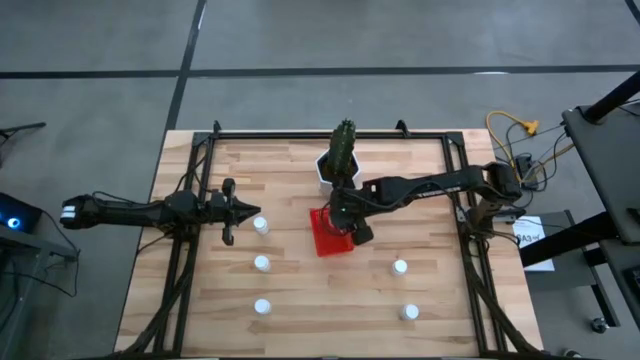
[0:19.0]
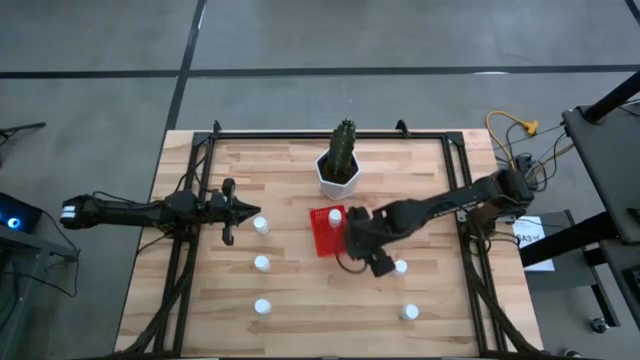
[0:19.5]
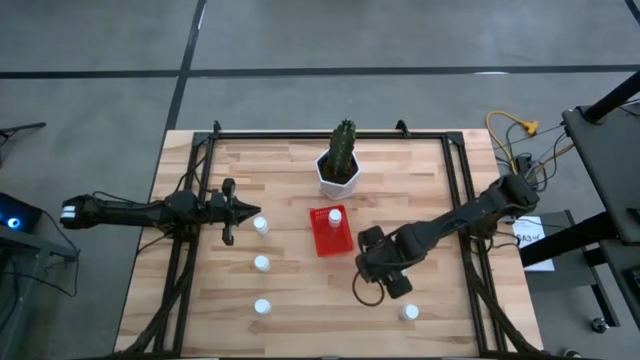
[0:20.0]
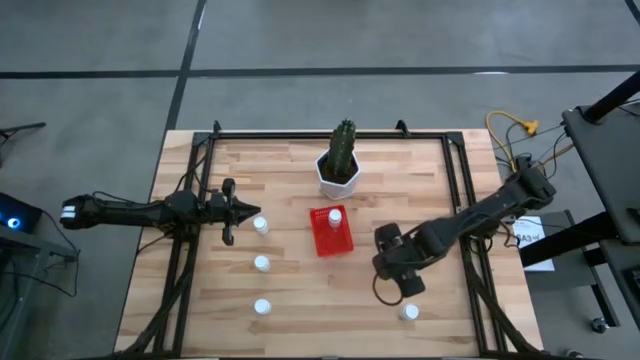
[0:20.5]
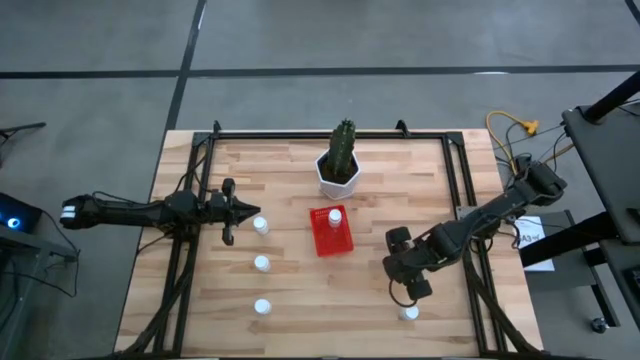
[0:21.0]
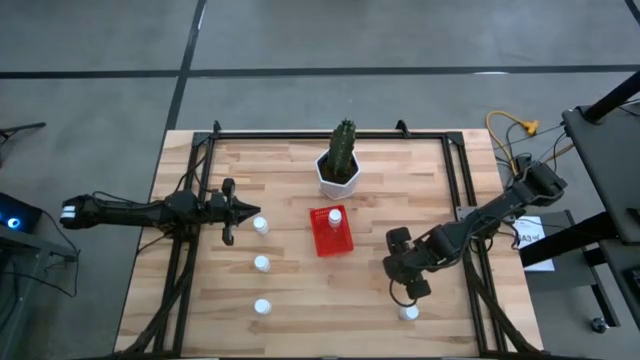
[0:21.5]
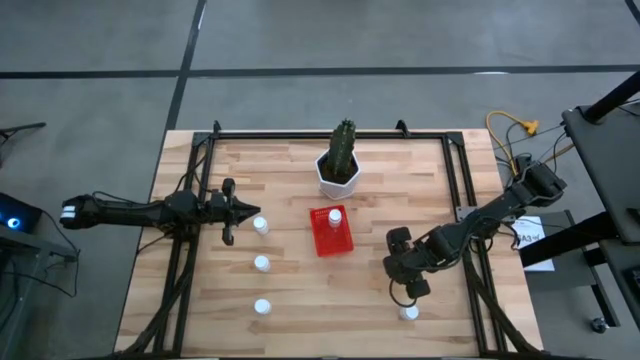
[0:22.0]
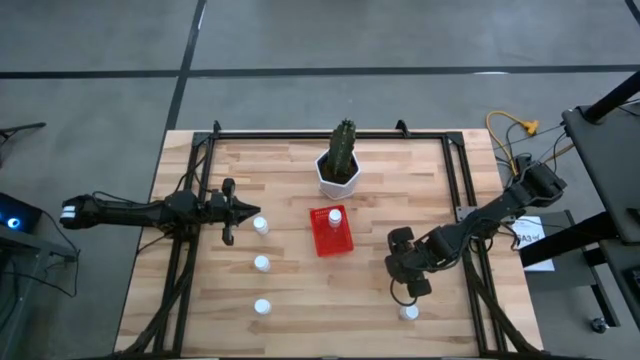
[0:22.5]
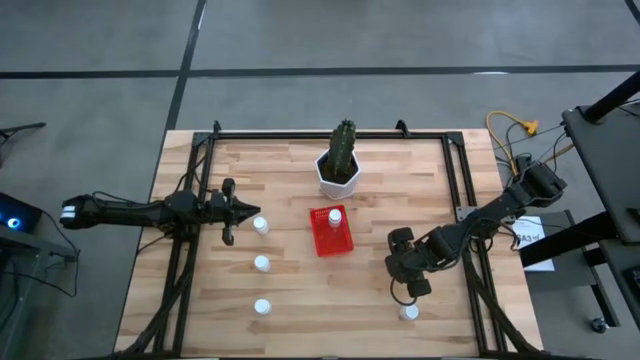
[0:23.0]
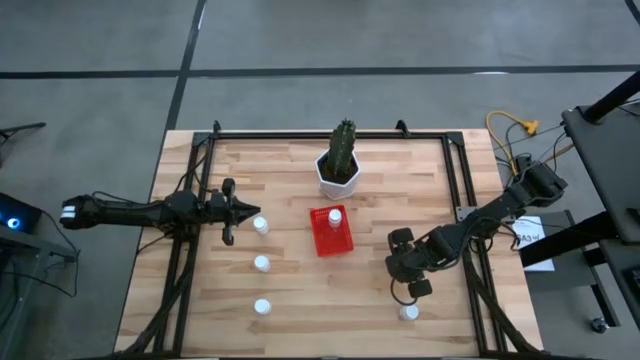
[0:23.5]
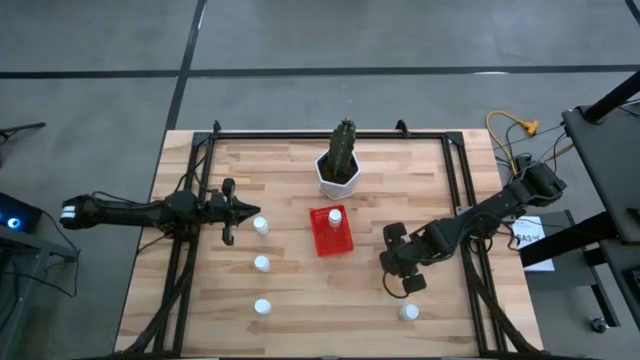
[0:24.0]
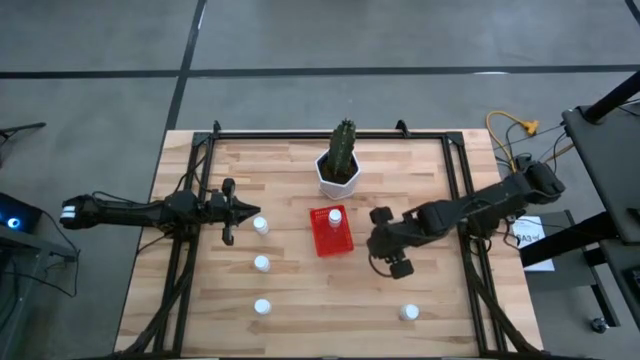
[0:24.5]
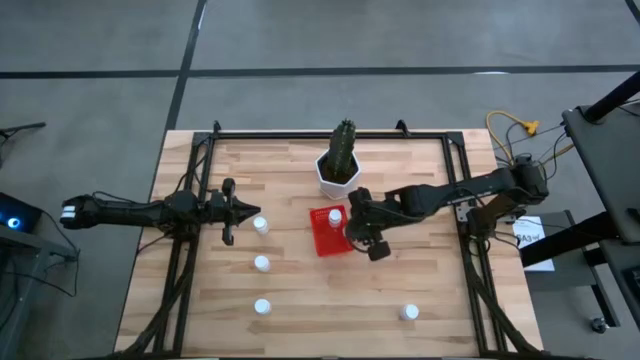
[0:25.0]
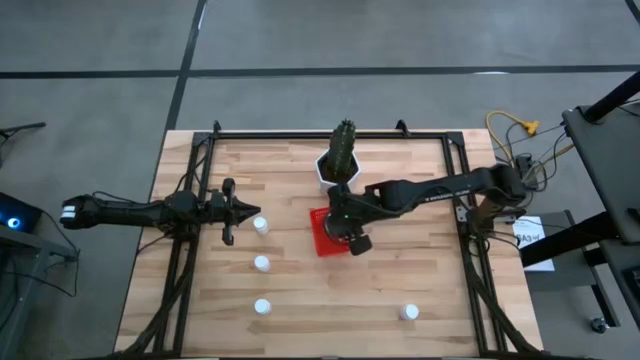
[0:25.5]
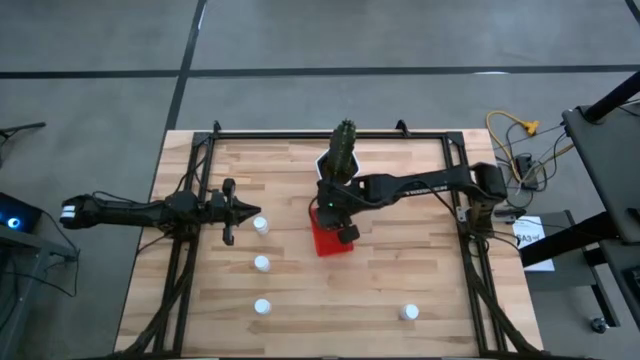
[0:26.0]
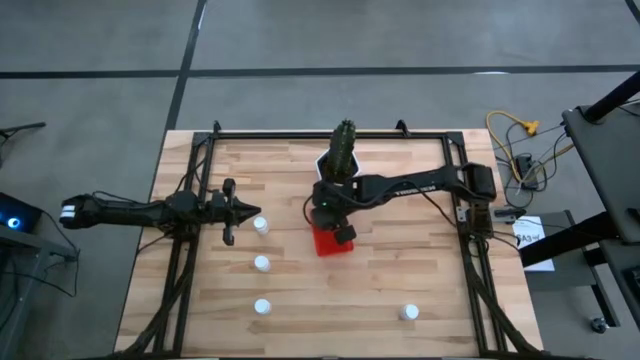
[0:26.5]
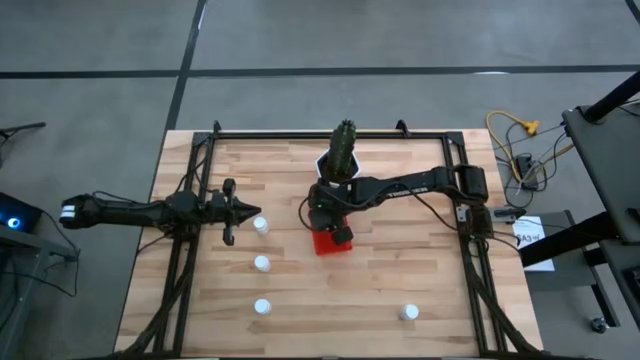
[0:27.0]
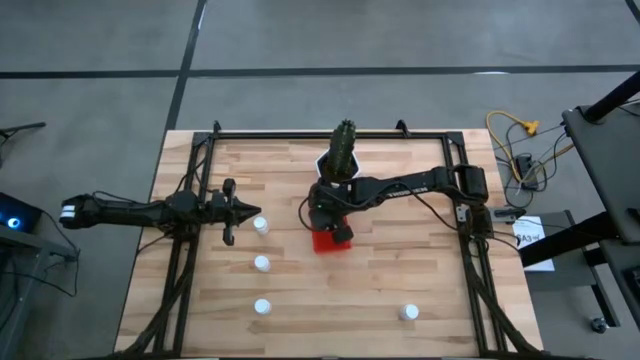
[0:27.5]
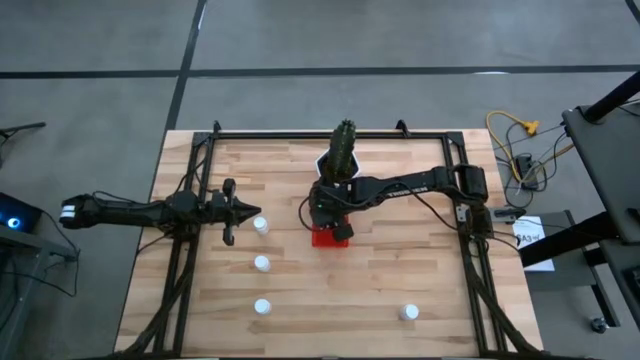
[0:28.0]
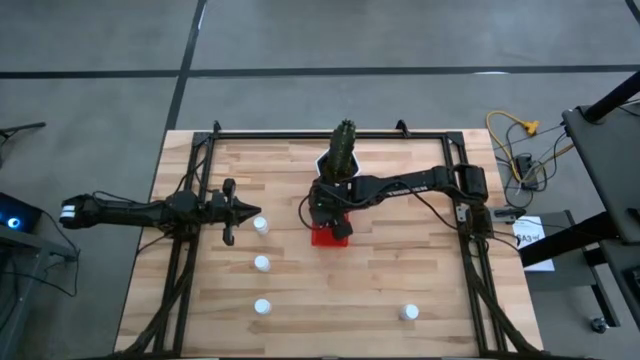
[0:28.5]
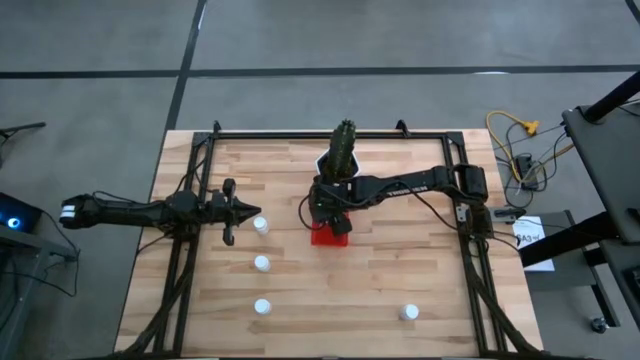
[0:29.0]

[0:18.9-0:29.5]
Task: Pick and place pill bottles into a basket
Put the white pill bottle into the red bin

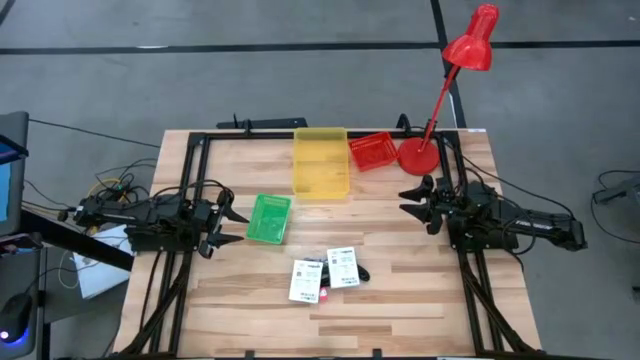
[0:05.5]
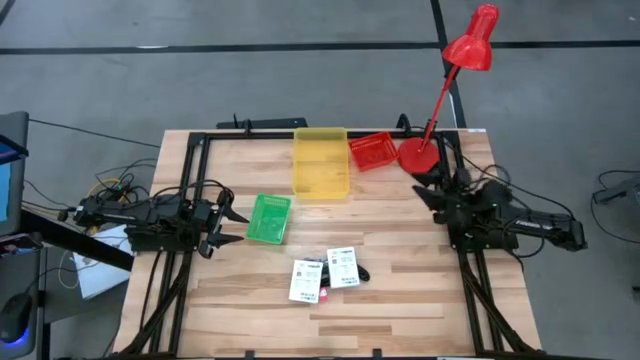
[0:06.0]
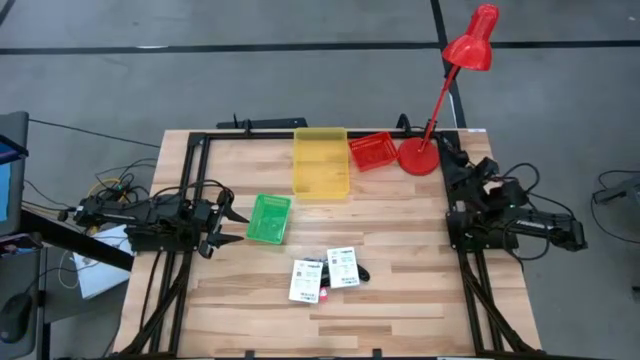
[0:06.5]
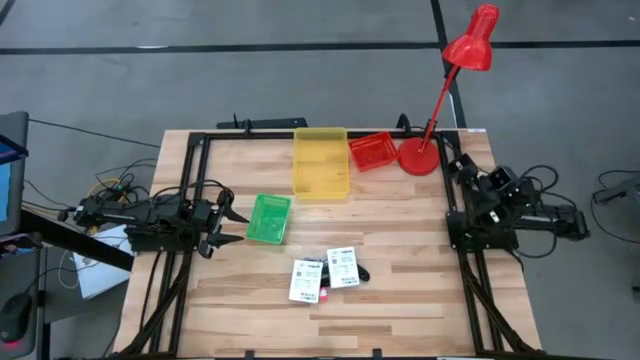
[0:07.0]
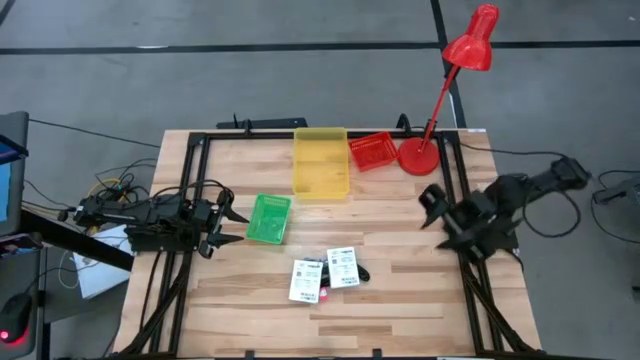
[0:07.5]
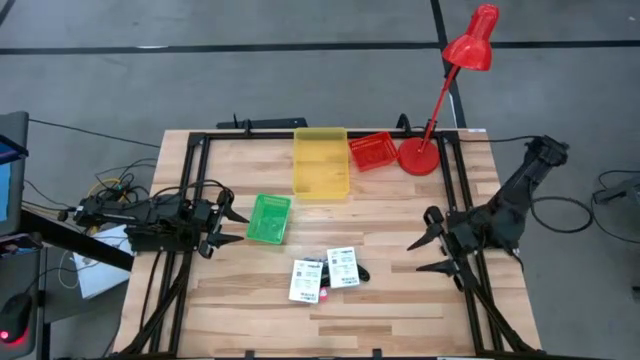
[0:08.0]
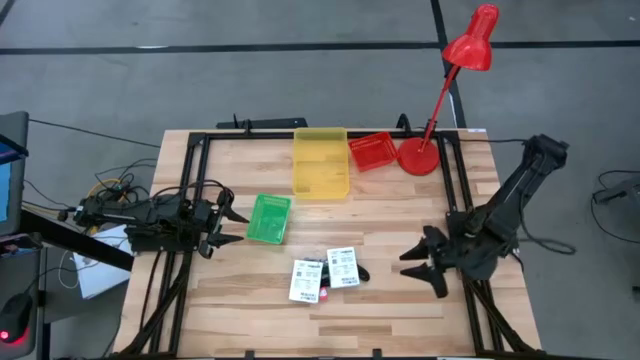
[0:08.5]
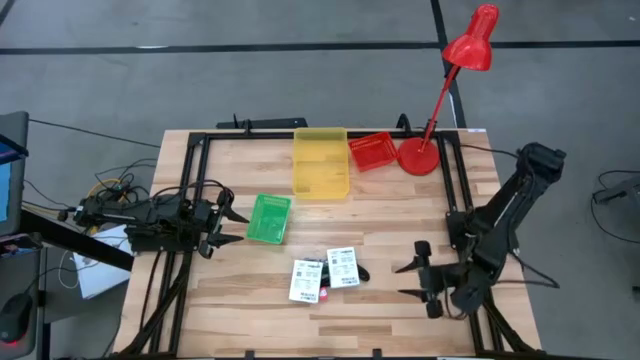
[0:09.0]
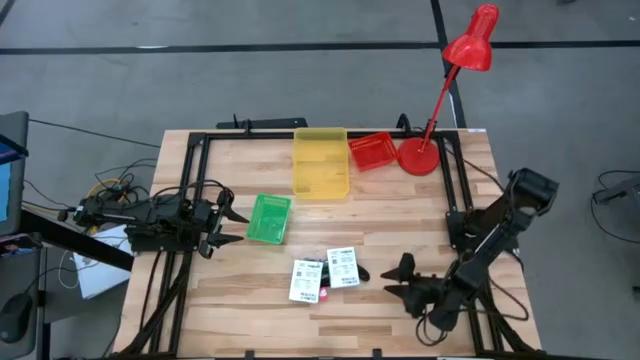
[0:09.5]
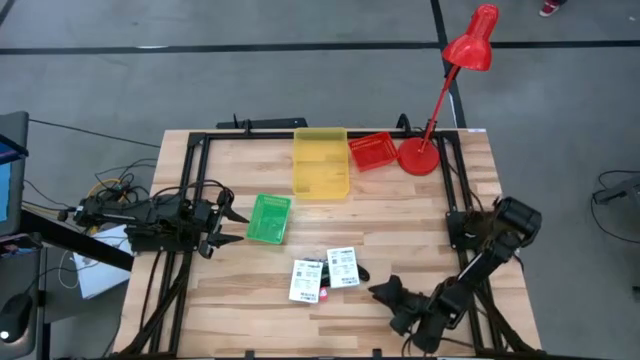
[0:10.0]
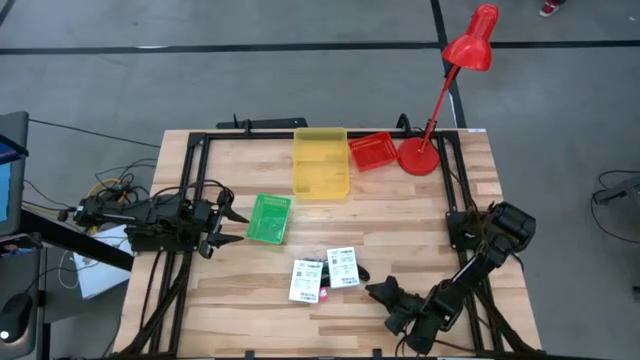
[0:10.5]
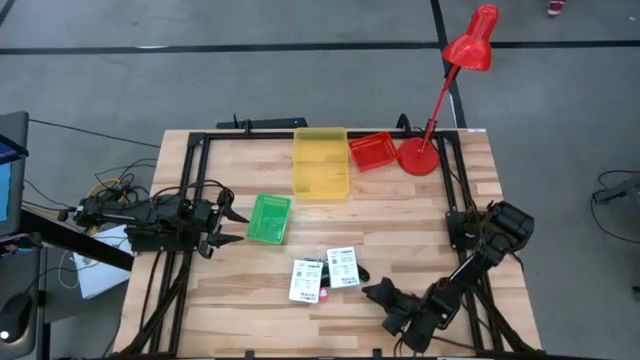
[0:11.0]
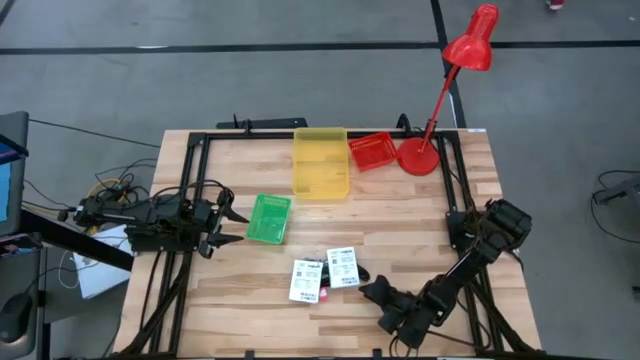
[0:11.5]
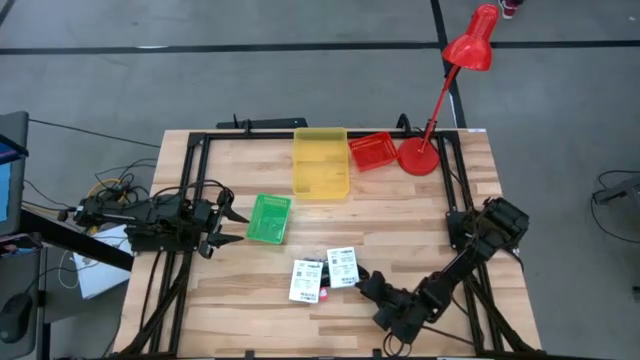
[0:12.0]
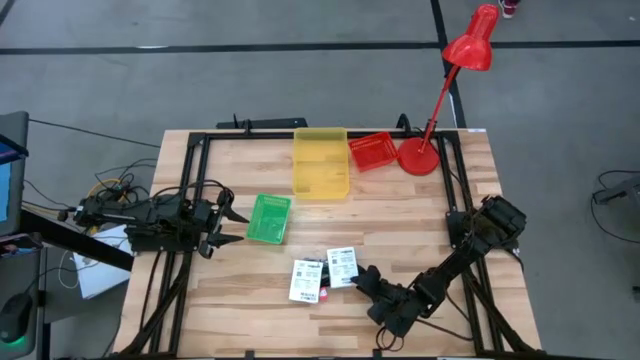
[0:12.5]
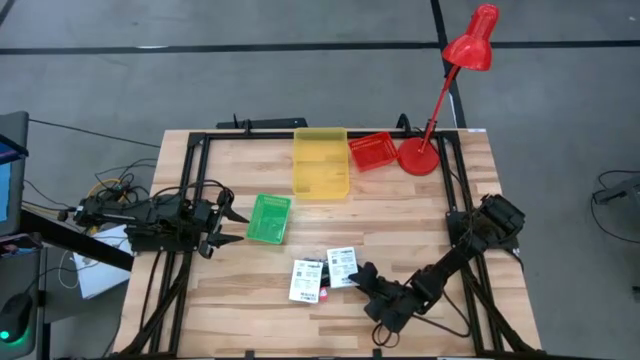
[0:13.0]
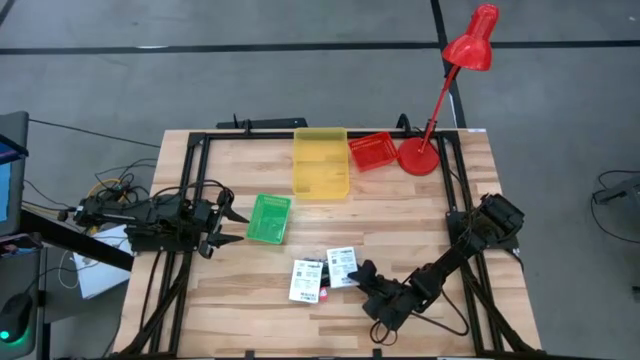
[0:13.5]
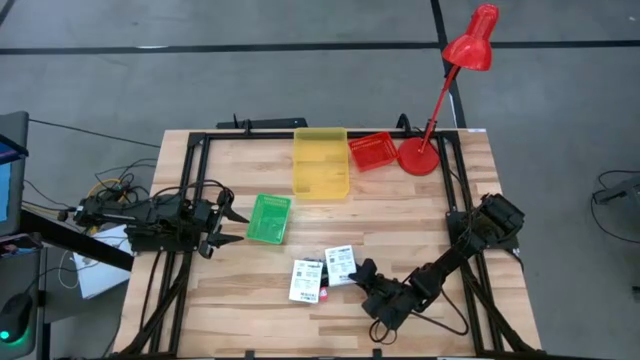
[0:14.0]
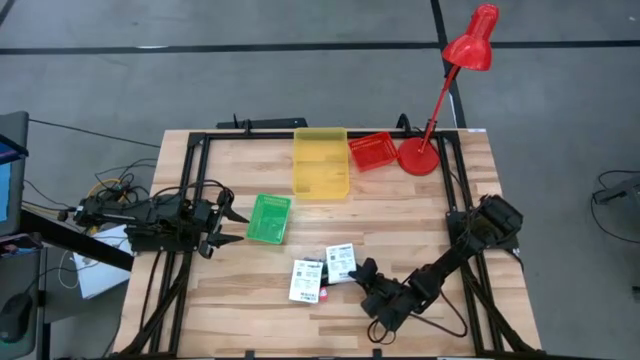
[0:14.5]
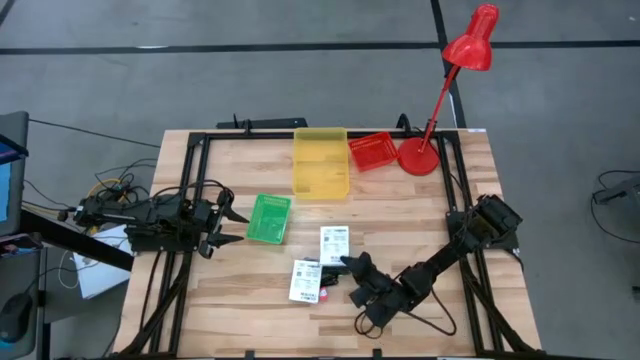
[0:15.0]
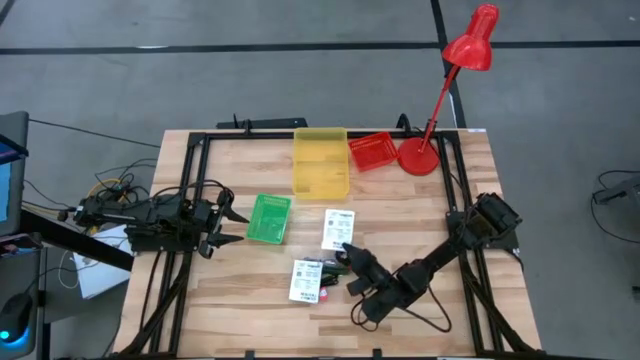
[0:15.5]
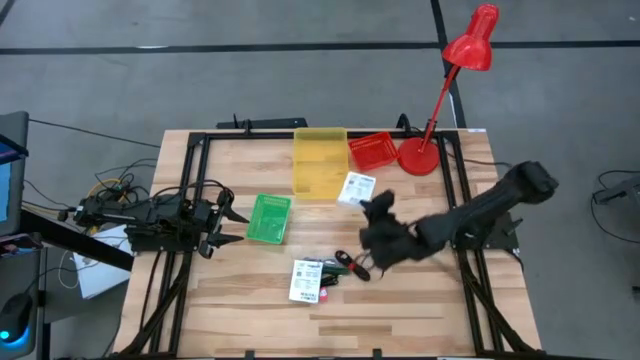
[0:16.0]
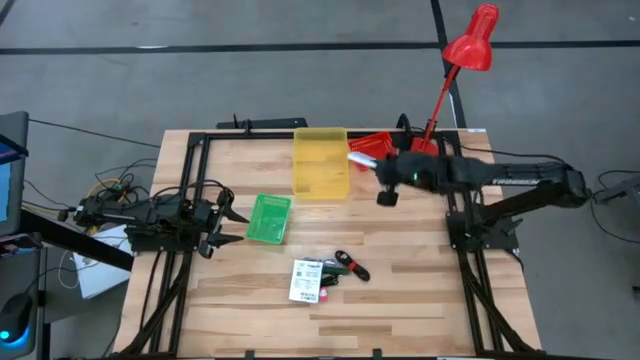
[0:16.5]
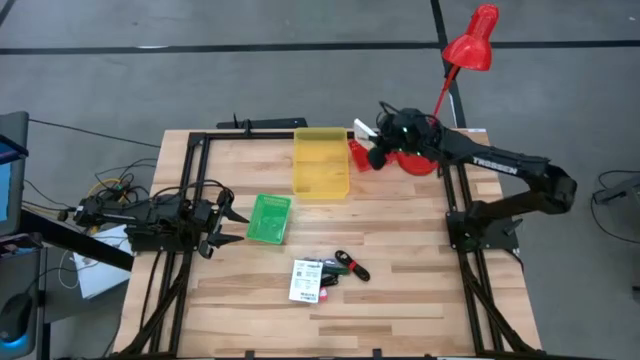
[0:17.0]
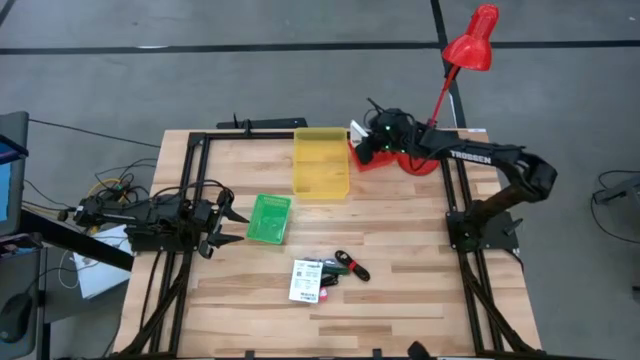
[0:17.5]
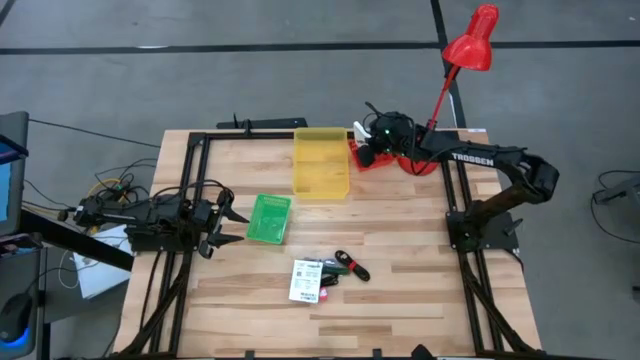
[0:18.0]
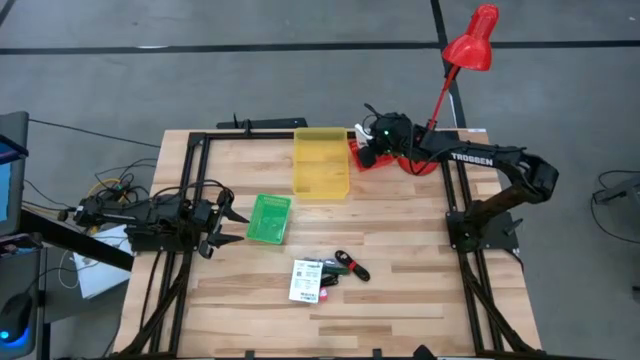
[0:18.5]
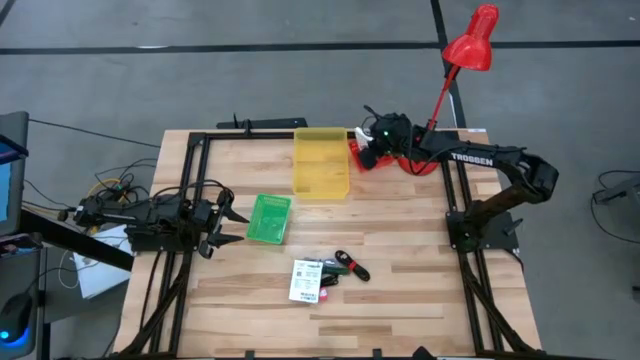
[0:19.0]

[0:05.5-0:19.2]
Task: Pick and place items into bin
Put the right white card reader box into the red bin
